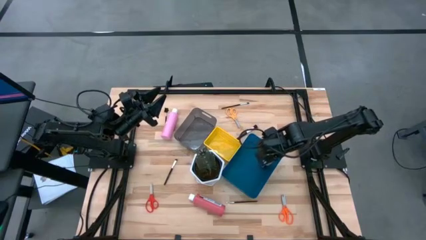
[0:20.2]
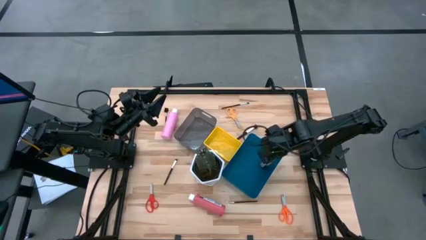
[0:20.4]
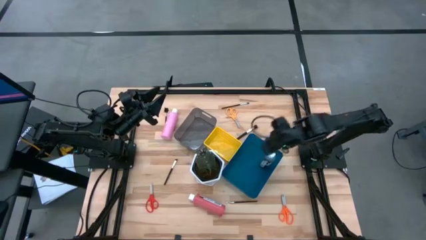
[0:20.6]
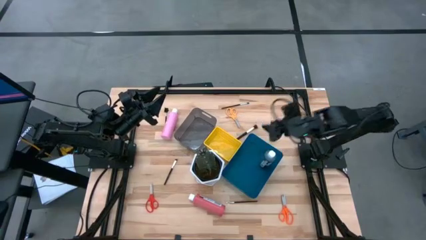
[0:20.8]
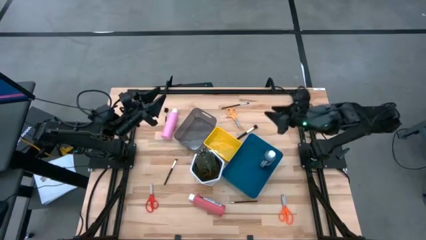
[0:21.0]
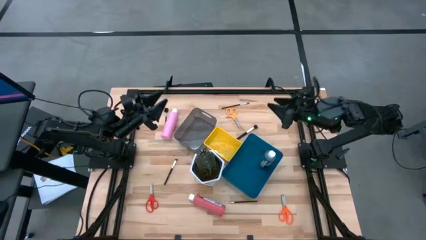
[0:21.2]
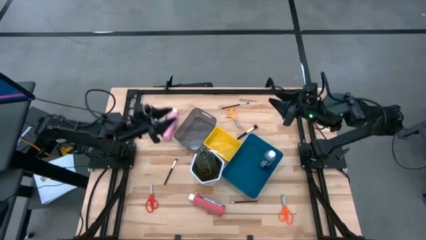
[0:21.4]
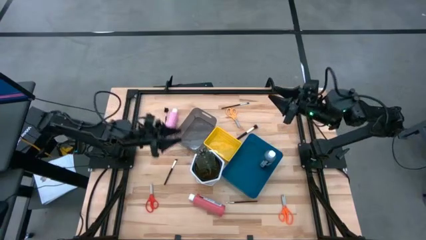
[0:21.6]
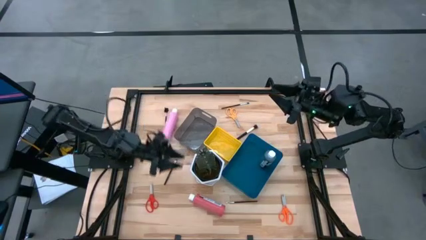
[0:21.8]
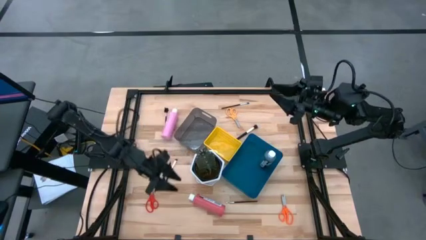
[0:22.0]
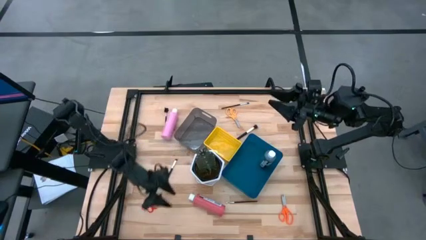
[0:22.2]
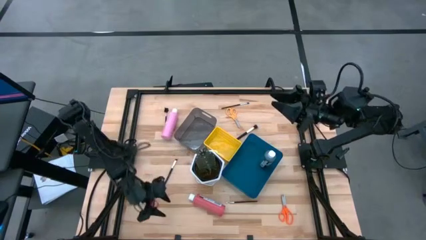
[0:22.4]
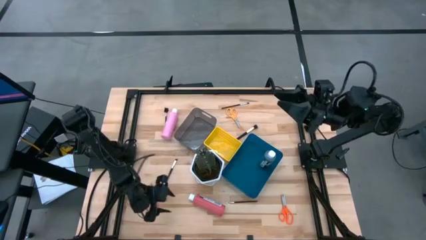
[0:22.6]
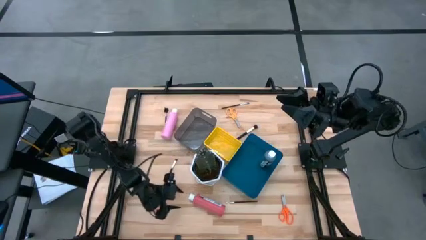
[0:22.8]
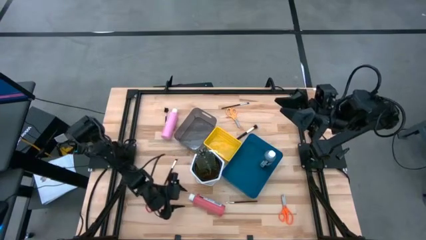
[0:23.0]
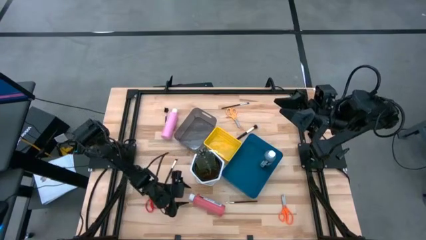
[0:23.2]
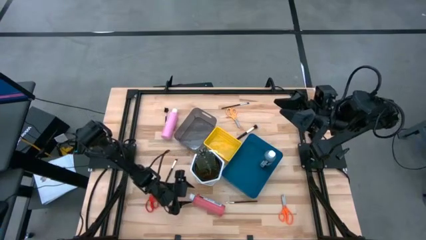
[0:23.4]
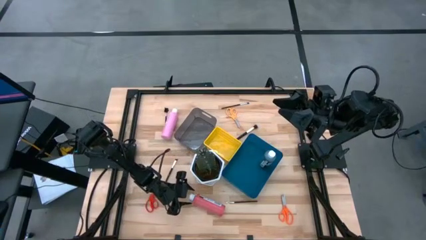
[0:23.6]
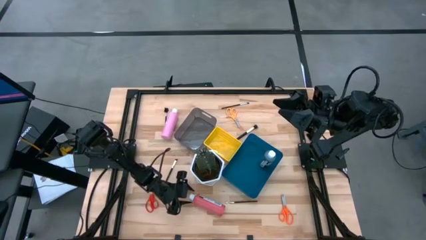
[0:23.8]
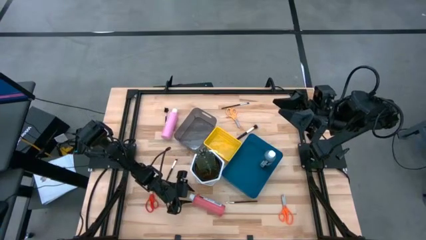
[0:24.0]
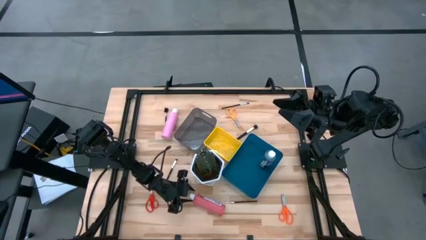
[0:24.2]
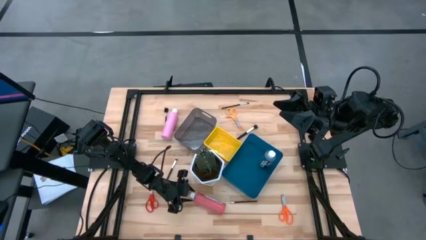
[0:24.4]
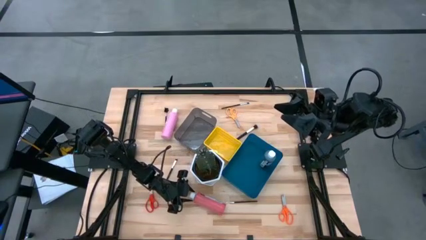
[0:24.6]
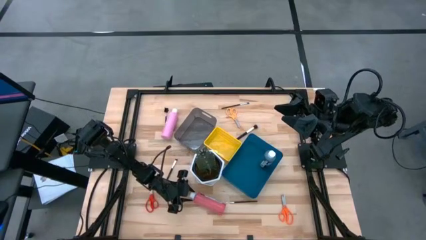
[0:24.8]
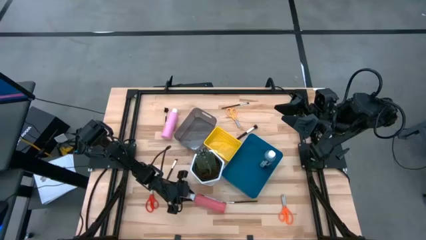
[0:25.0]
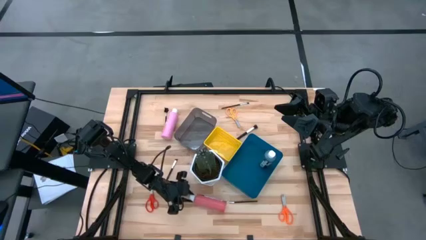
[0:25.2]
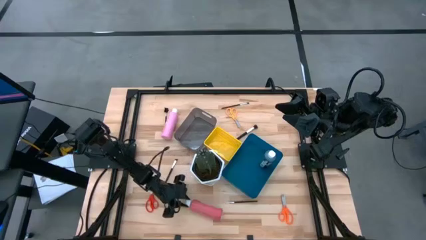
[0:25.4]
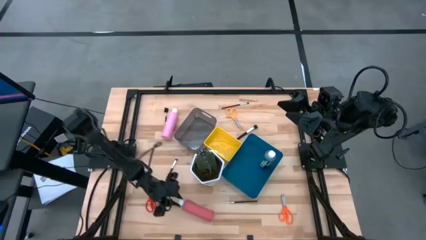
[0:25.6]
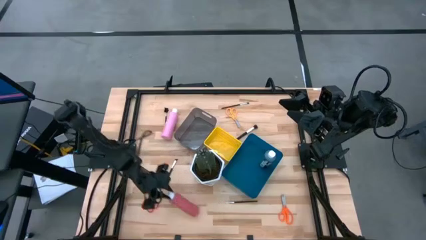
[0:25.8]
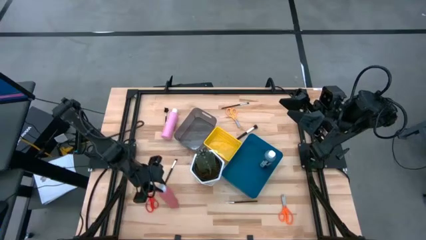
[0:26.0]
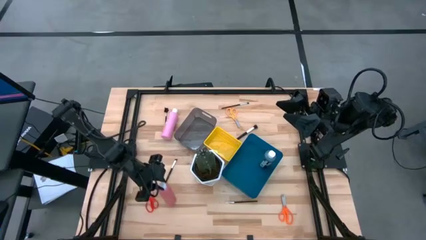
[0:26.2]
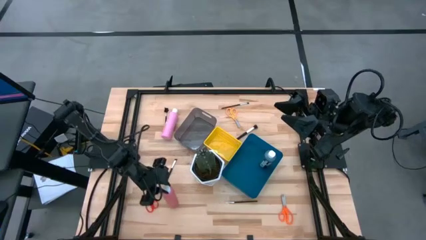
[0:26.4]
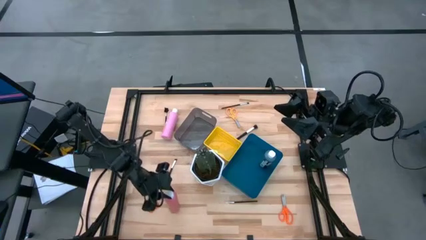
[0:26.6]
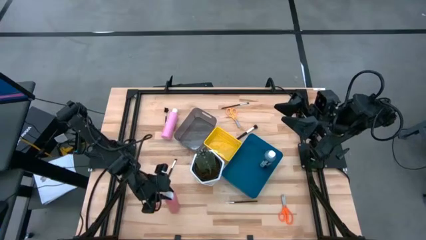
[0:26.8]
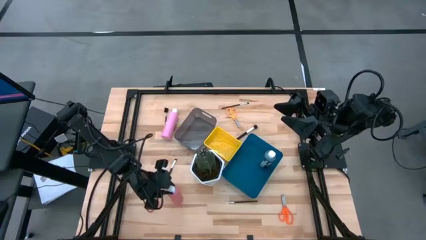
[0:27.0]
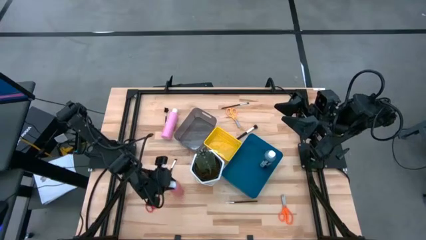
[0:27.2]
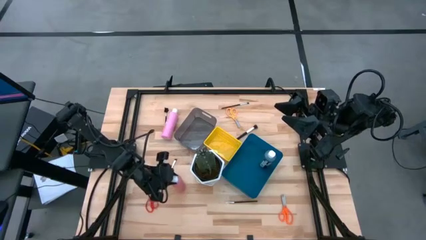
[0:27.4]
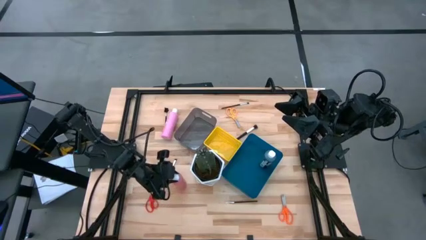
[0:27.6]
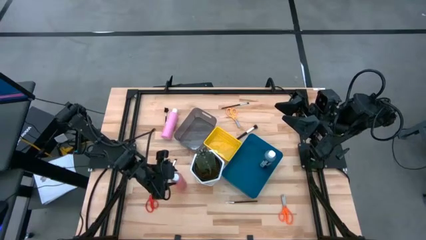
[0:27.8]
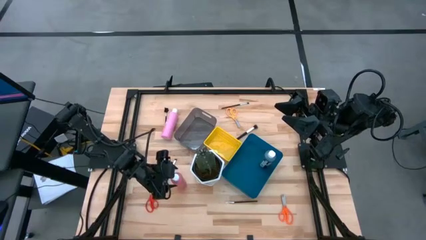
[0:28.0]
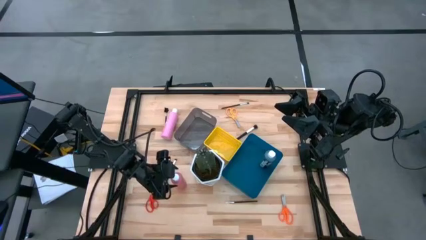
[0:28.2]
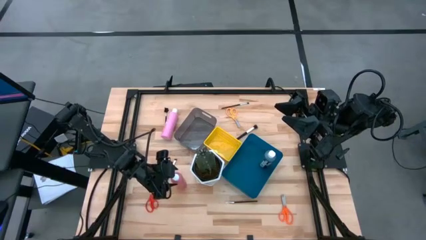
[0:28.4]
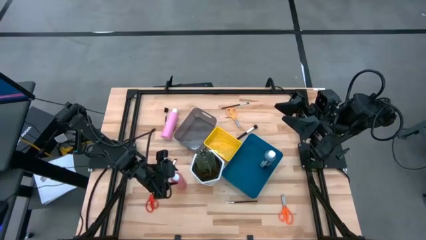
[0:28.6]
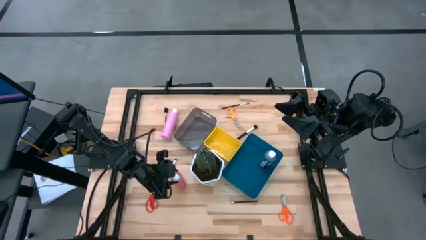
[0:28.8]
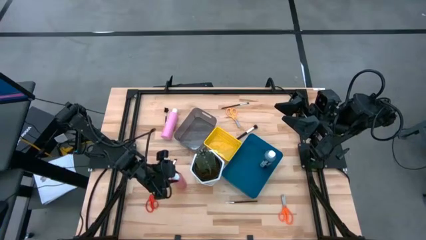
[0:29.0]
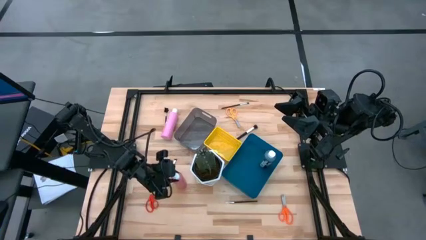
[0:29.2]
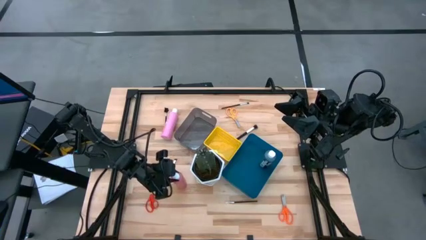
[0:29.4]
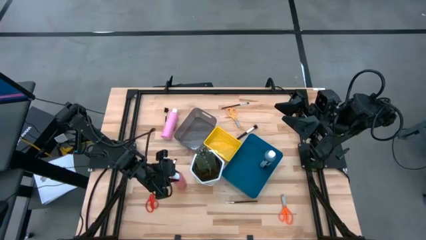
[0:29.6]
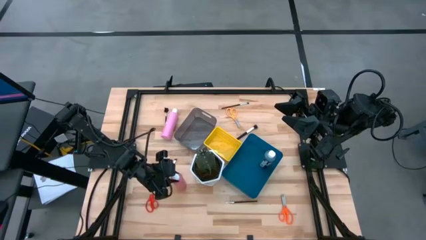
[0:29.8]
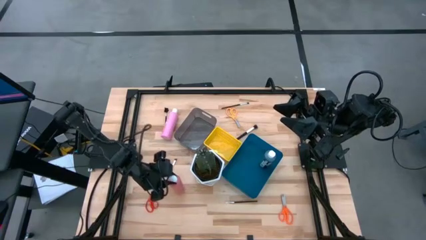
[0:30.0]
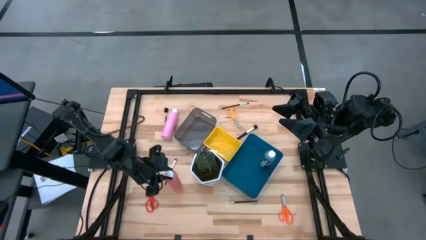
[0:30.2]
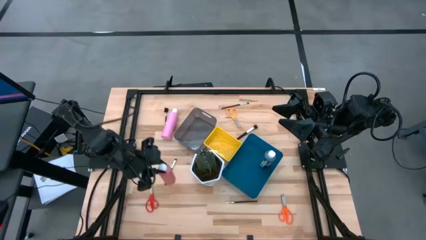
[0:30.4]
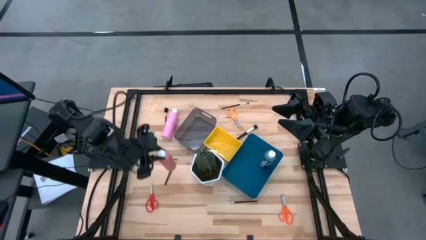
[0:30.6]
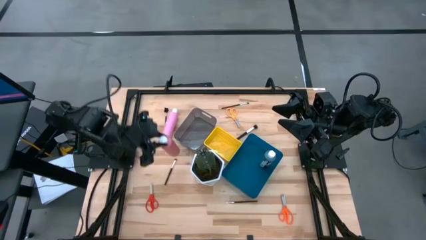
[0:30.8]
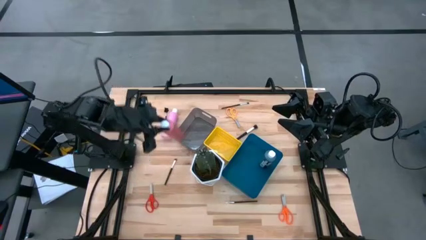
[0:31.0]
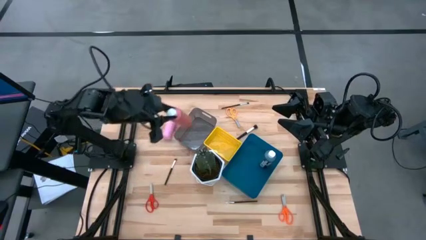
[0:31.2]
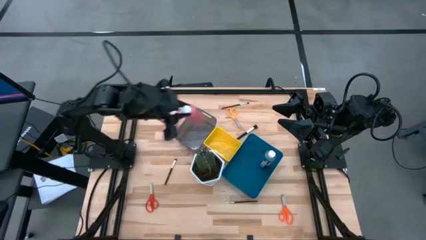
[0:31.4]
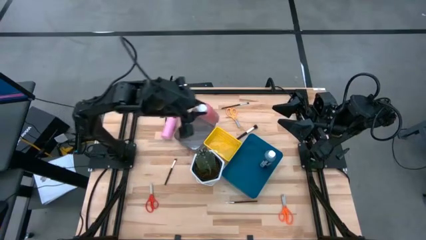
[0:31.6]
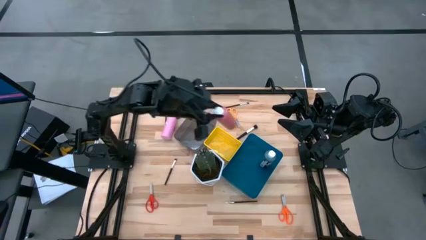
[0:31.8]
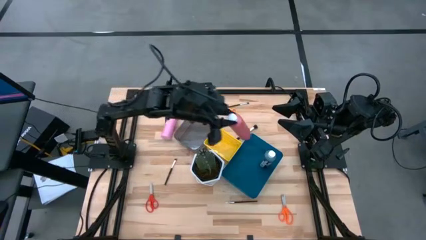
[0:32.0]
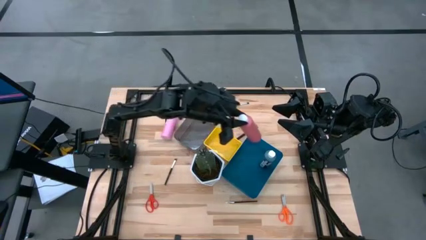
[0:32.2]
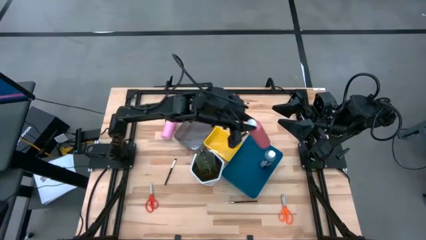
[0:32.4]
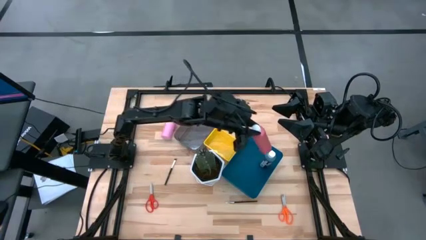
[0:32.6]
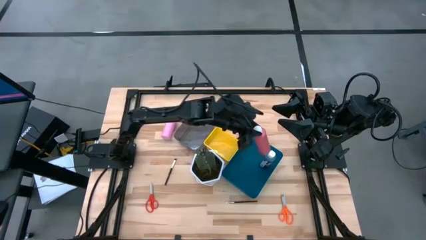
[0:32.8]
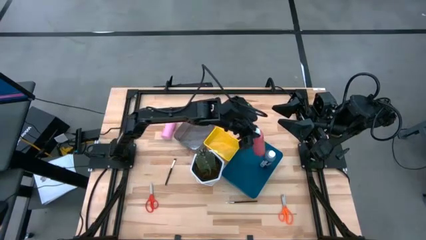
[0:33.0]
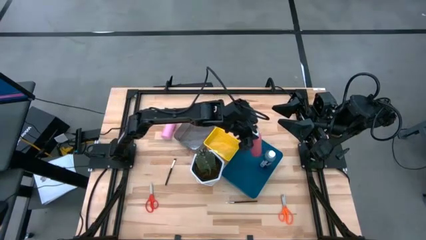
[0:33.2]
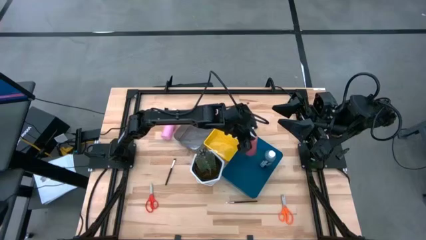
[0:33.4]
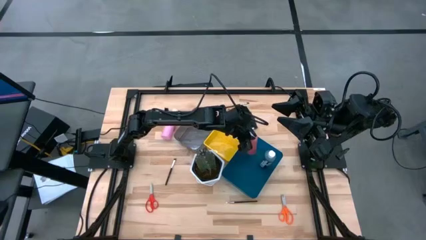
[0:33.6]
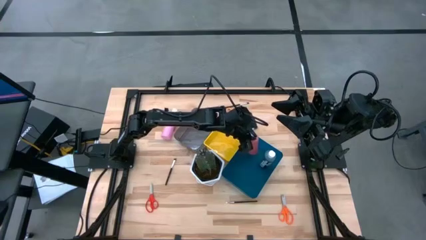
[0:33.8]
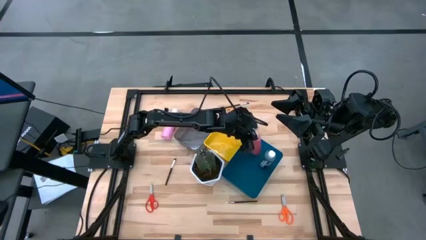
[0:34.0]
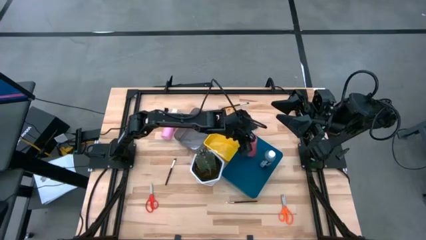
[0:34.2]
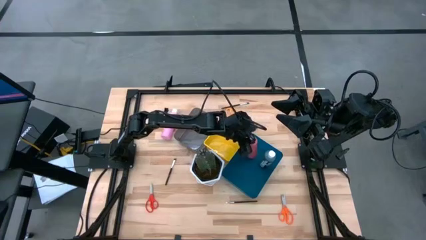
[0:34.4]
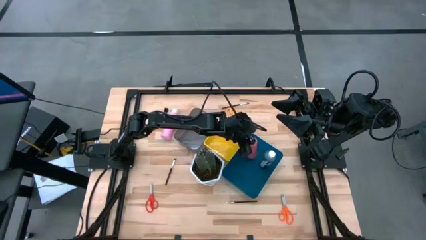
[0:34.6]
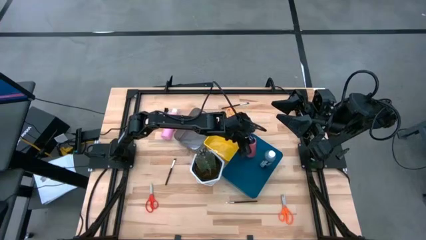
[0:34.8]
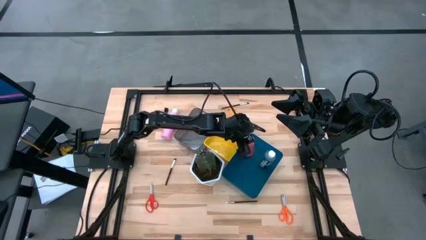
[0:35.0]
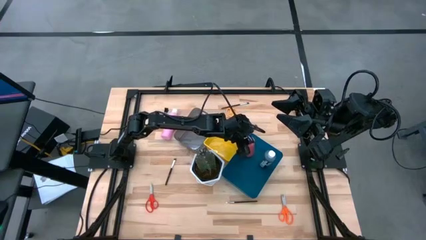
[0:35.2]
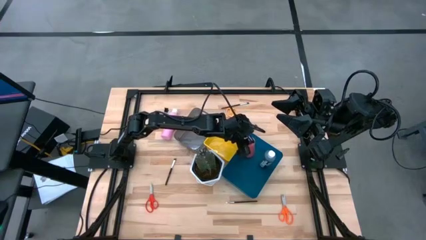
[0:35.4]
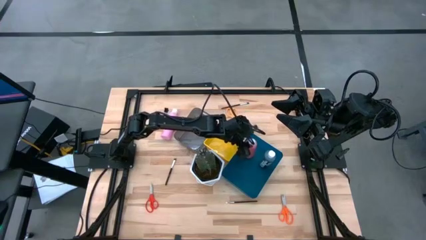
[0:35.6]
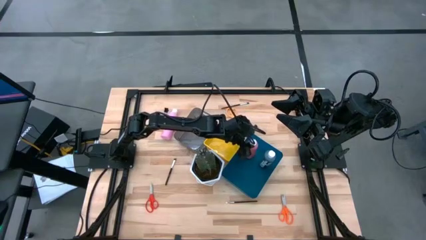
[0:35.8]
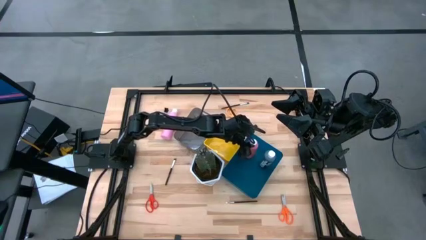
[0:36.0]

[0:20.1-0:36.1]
Task: Pick & Place Paint Supplies
Put the red paint bottle into the blue bin
